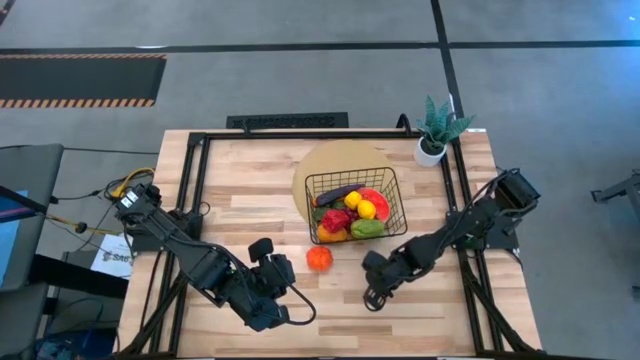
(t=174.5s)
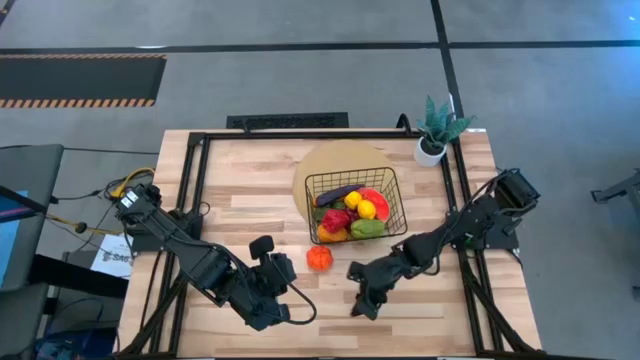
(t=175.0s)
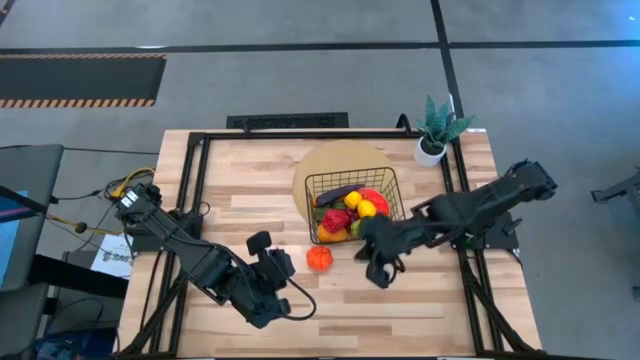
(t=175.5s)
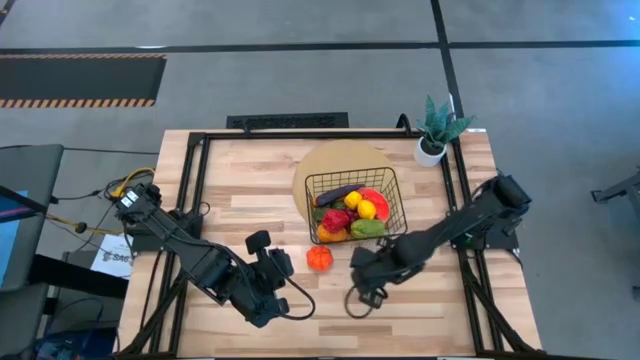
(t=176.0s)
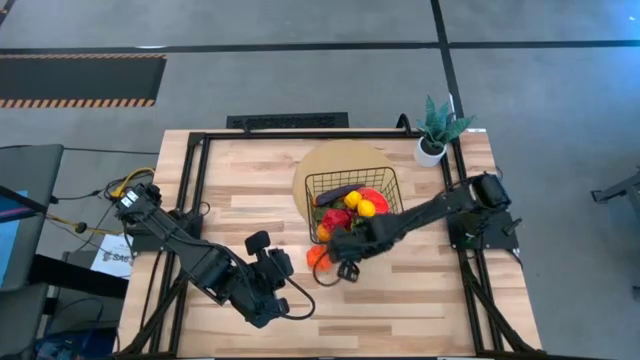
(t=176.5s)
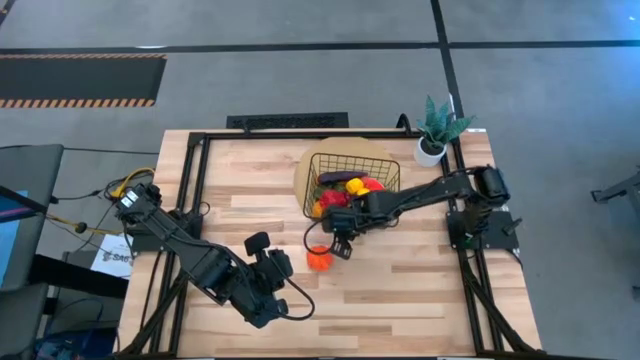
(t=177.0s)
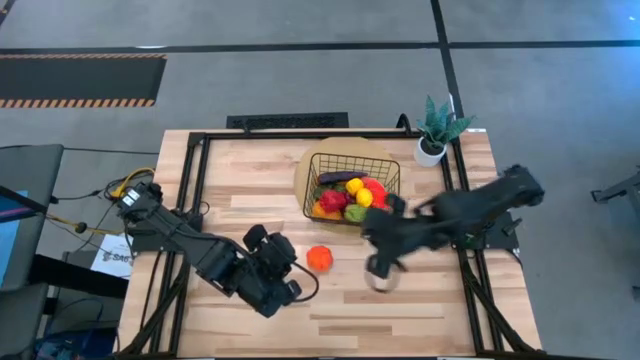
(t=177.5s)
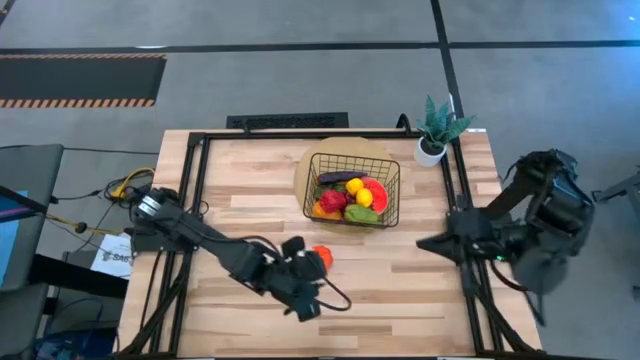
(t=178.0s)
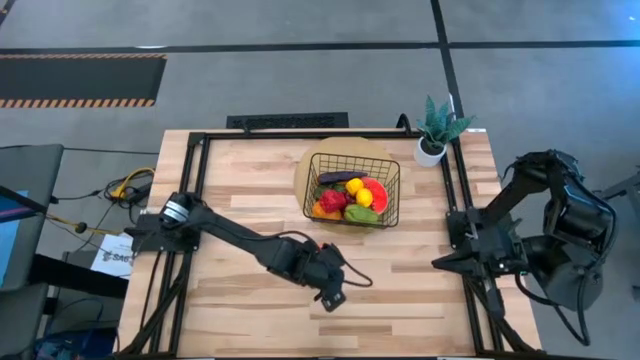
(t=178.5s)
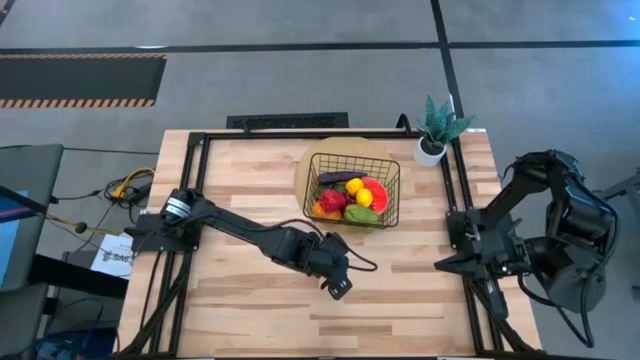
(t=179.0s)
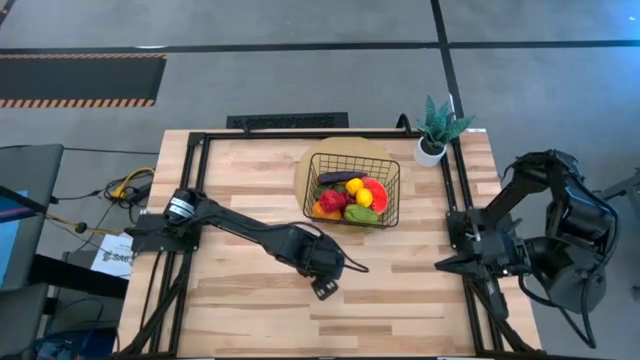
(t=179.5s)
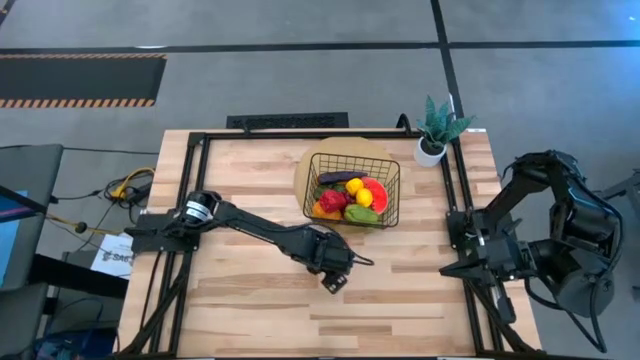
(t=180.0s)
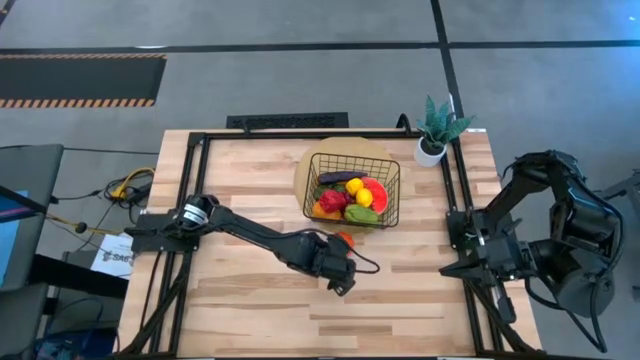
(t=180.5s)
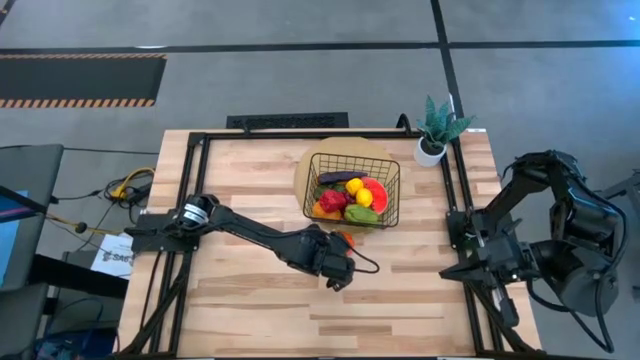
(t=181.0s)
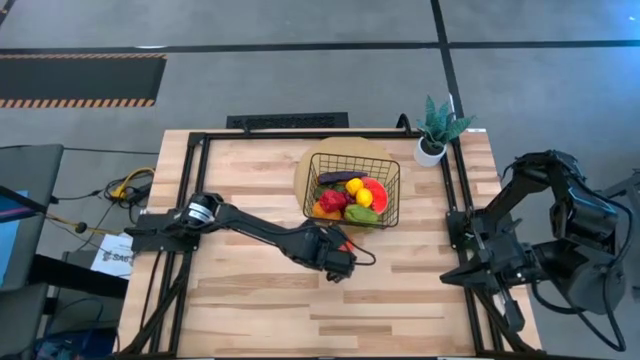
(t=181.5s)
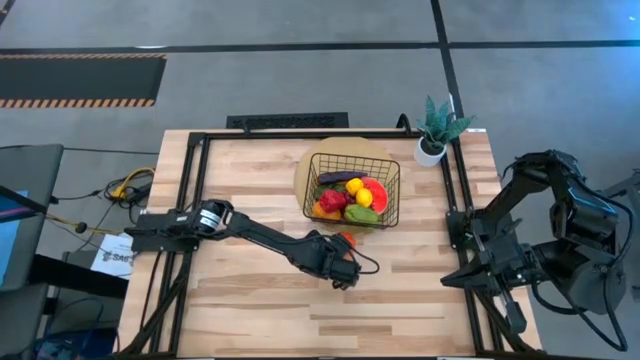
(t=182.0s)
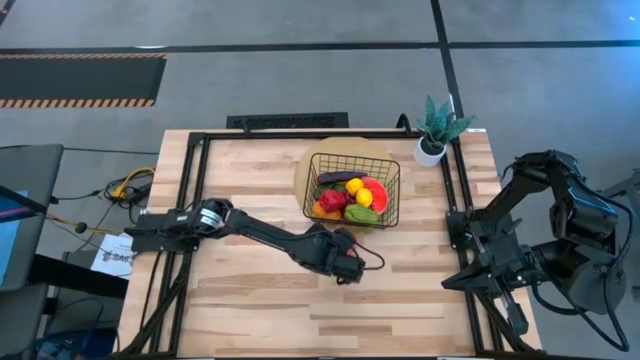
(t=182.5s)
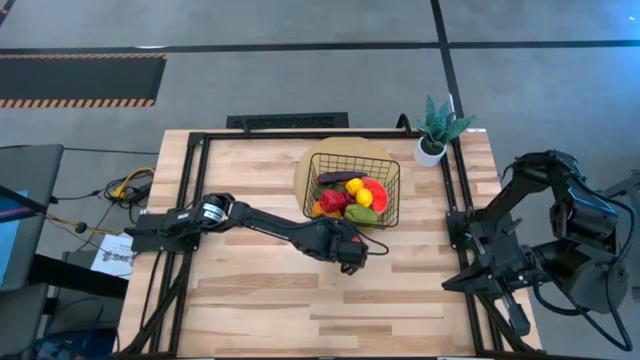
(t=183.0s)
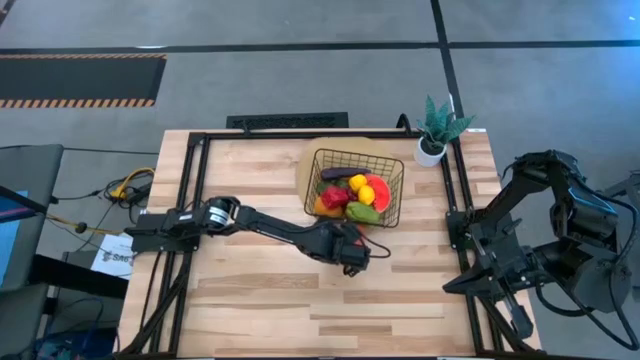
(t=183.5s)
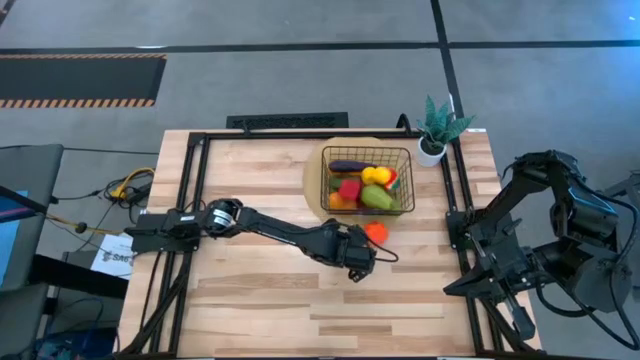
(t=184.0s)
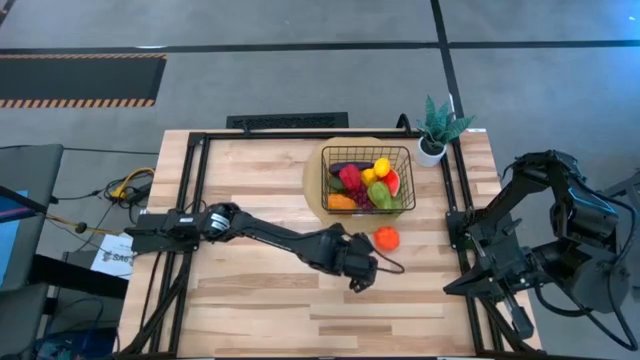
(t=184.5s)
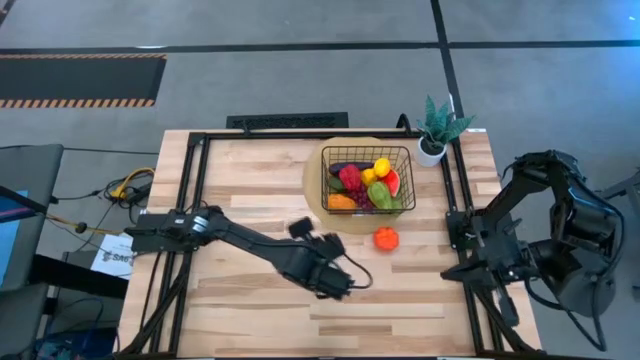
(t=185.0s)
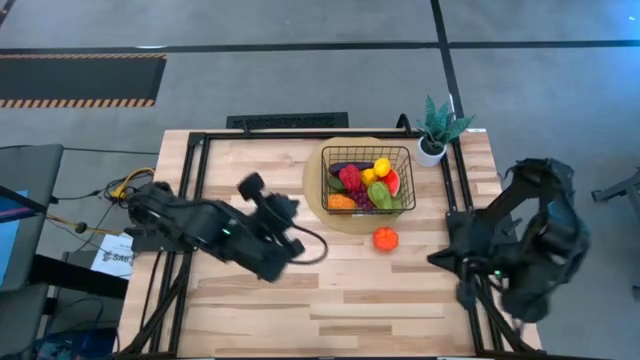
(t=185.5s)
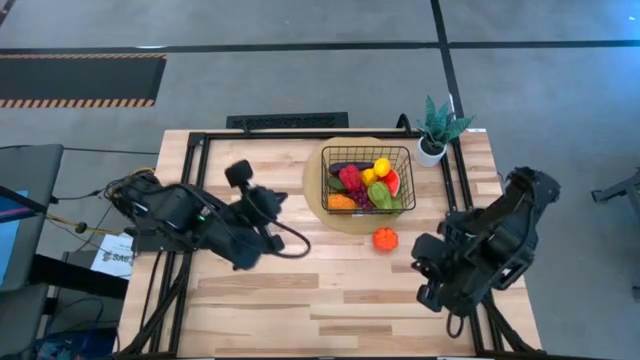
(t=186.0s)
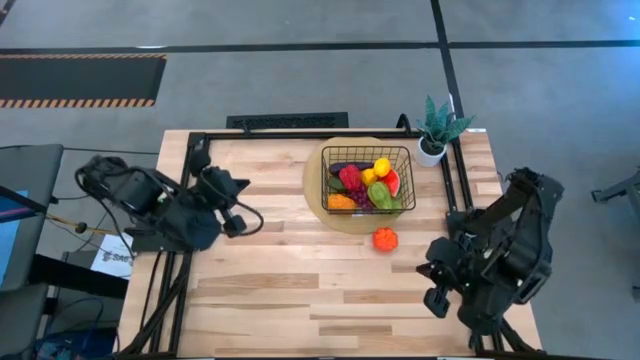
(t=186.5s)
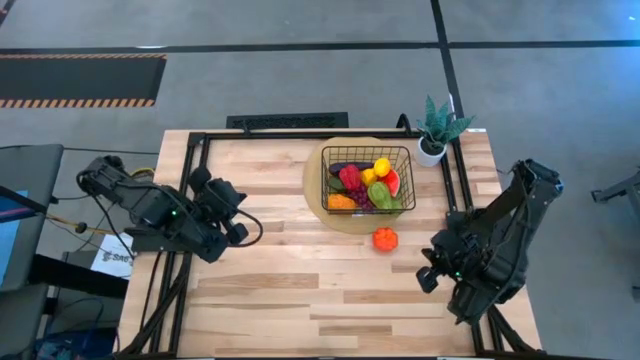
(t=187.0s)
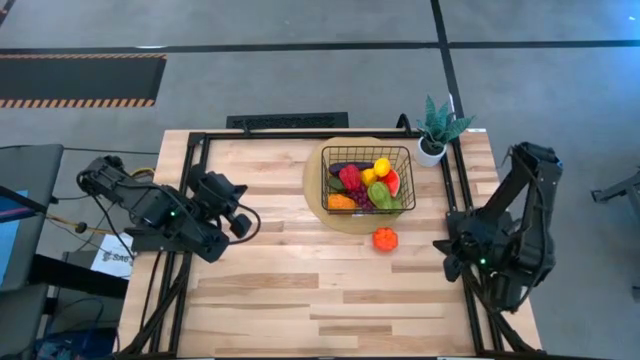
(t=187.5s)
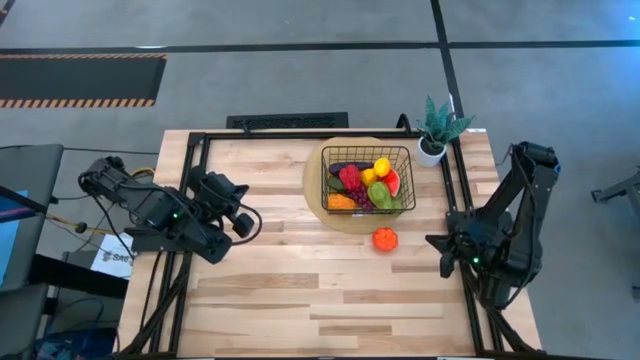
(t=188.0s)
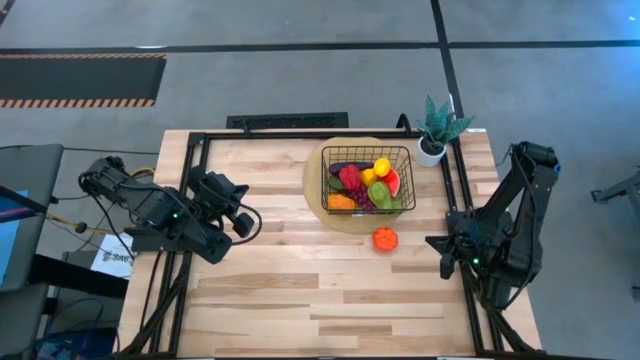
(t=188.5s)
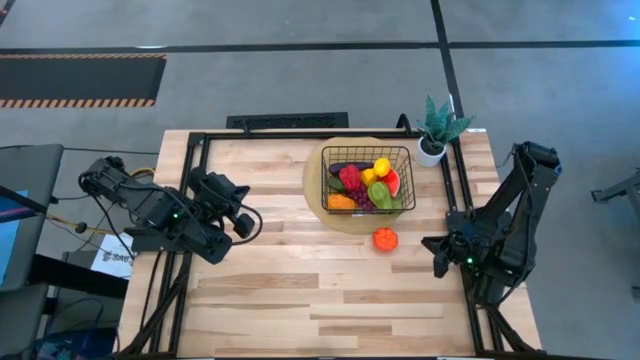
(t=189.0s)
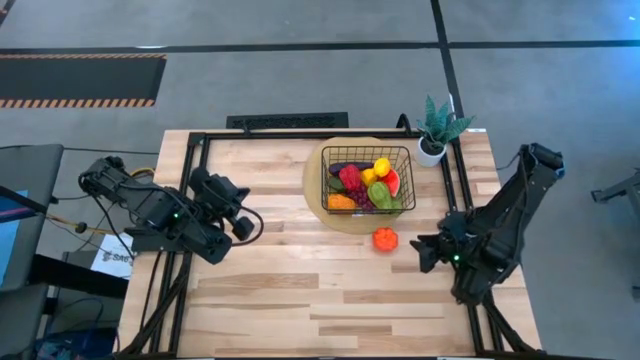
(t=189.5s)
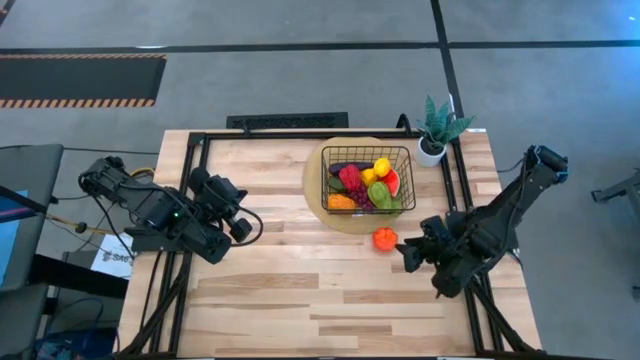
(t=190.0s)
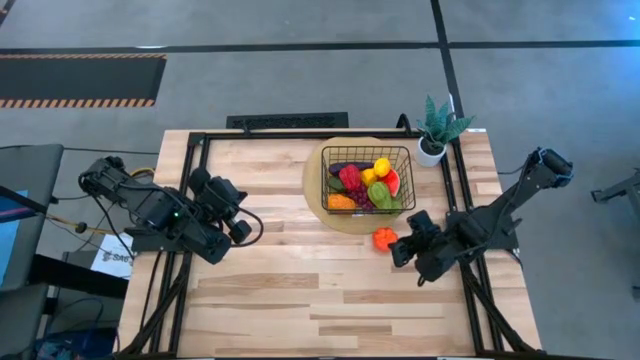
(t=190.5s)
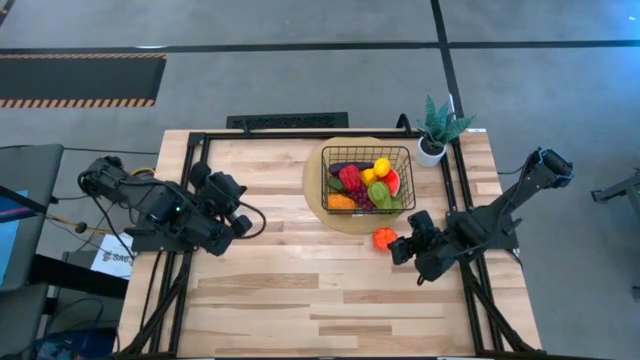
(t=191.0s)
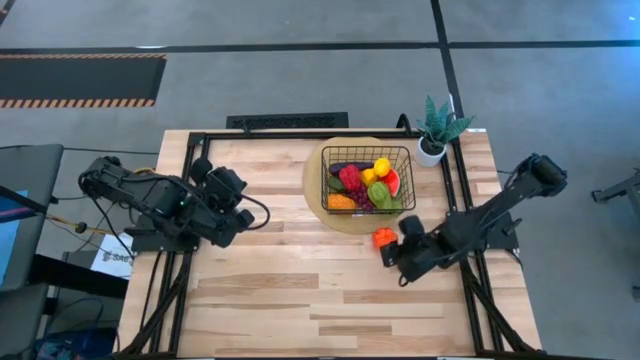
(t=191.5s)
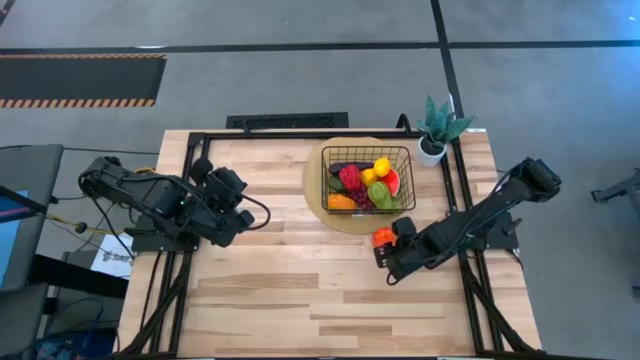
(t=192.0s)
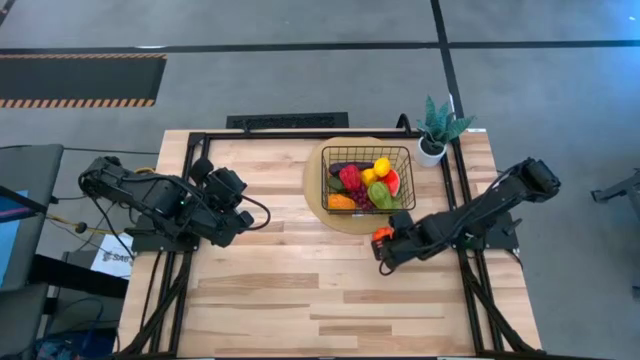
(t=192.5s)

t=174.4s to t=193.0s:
Task: Build produce basket
Put the orange pumpkin into the wire basket

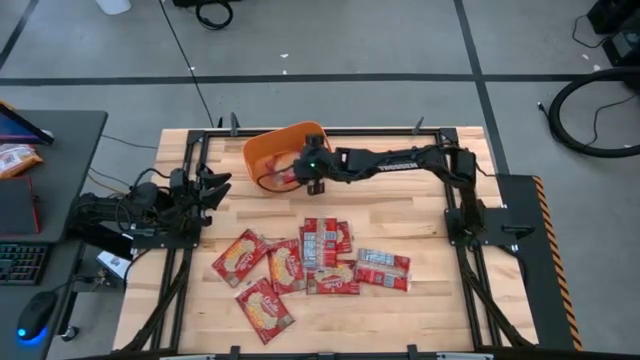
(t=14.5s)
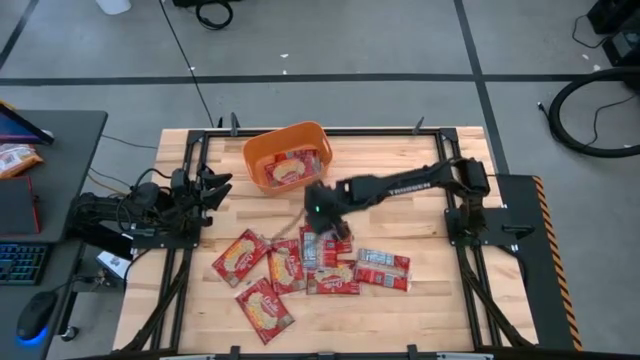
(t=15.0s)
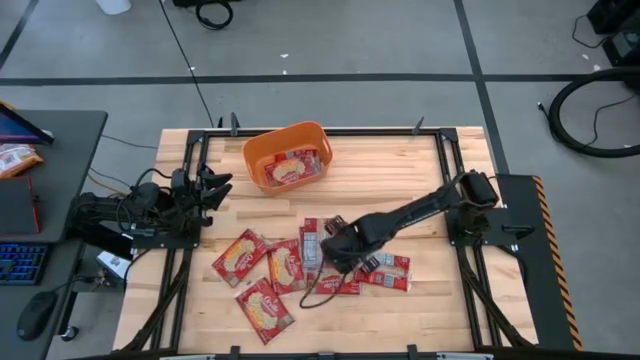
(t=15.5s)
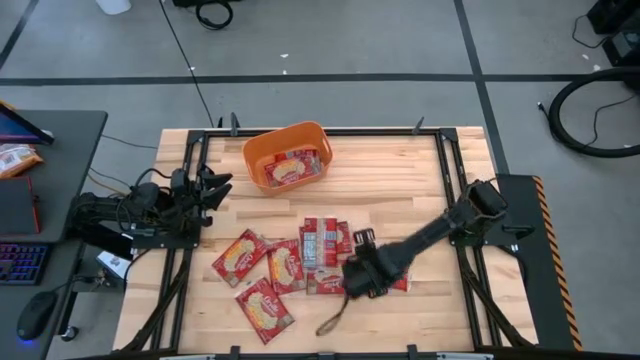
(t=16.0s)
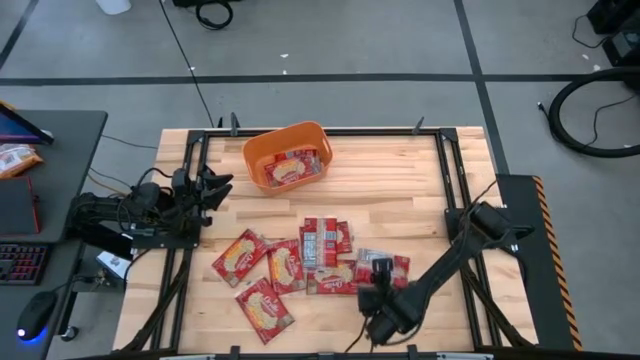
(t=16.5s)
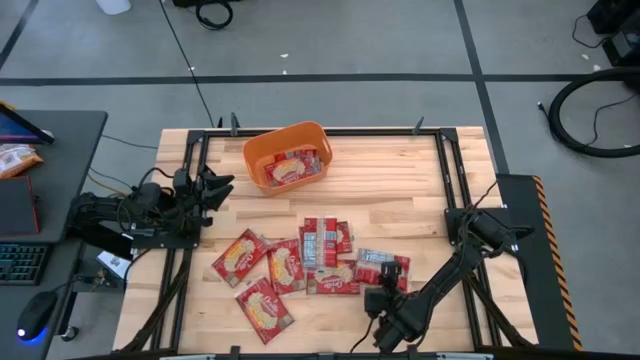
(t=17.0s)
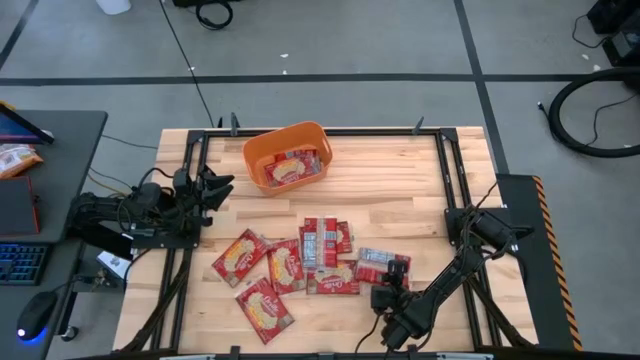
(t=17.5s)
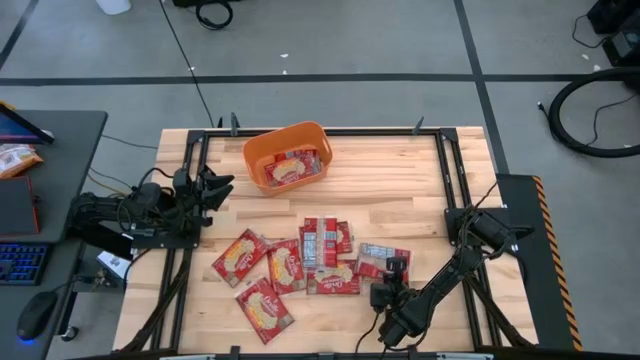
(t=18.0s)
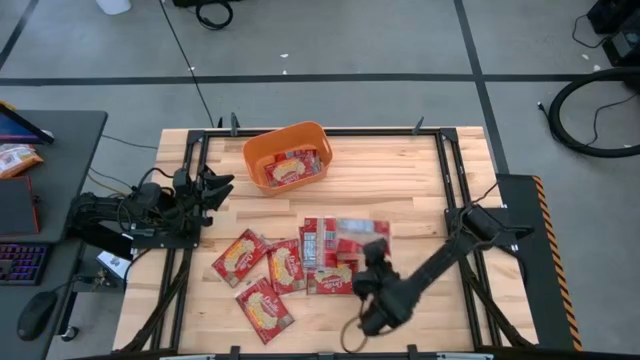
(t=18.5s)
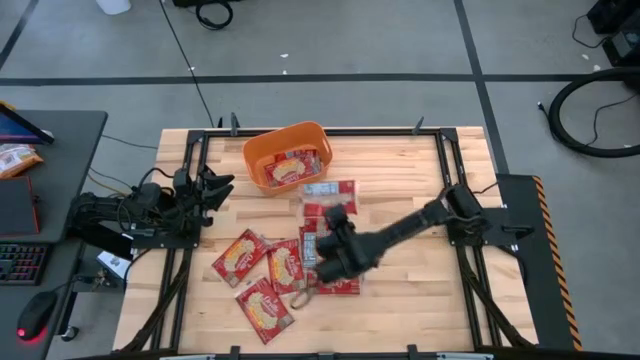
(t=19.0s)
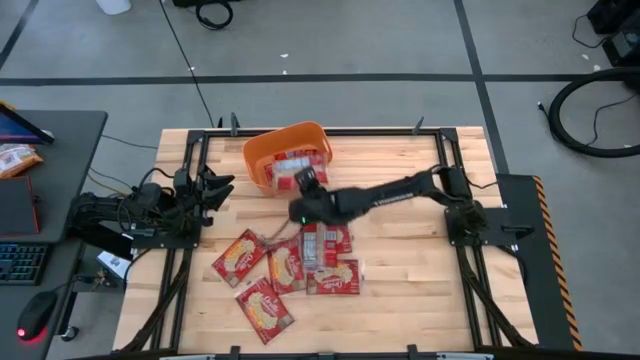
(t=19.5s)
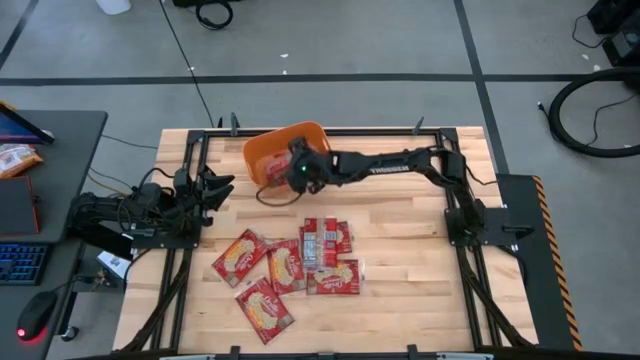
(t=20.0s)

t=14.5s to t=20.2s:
Task: Sort popcorn bags into baskets
Put the red popcorn bag into the orange bin
